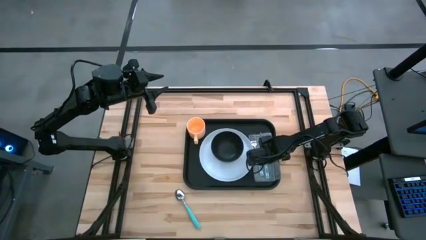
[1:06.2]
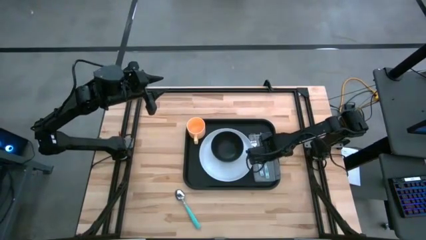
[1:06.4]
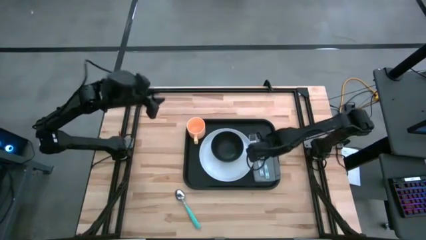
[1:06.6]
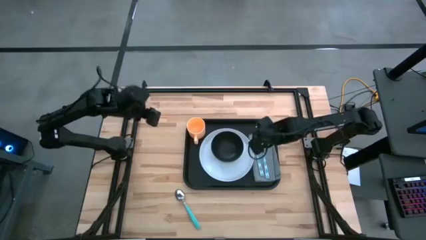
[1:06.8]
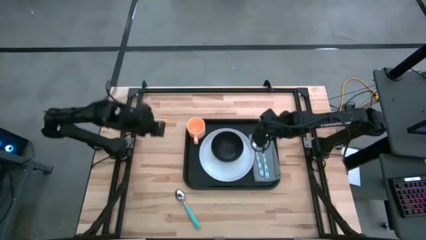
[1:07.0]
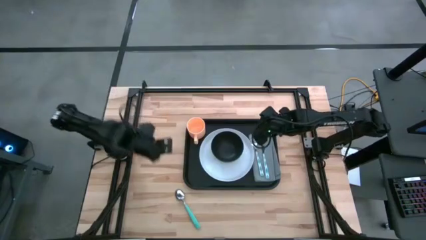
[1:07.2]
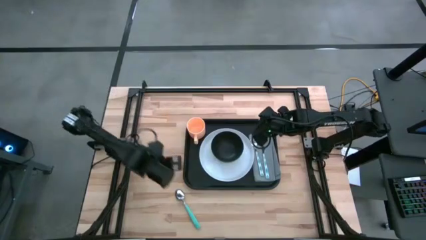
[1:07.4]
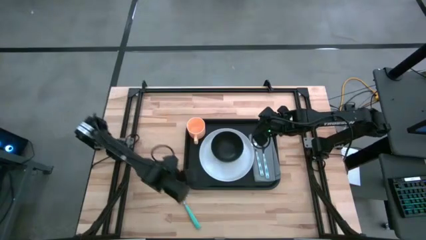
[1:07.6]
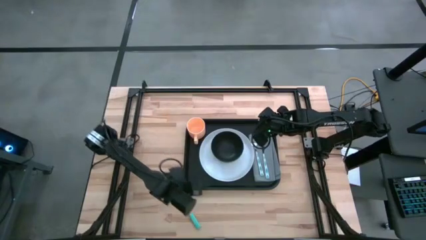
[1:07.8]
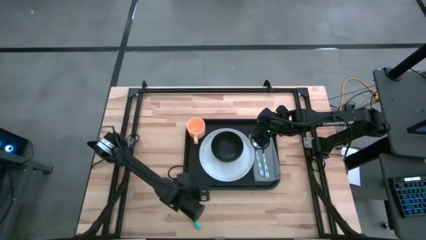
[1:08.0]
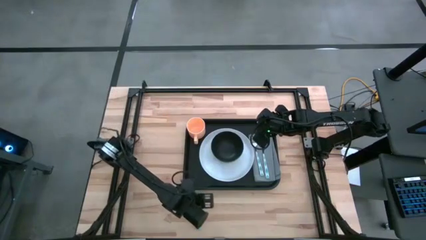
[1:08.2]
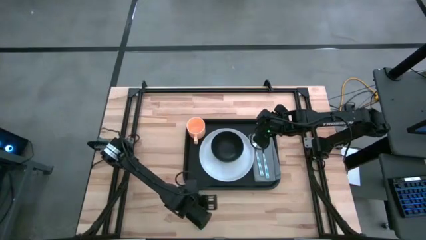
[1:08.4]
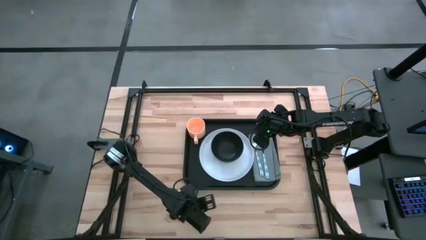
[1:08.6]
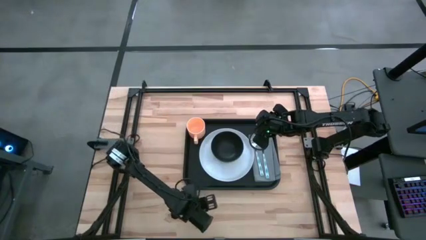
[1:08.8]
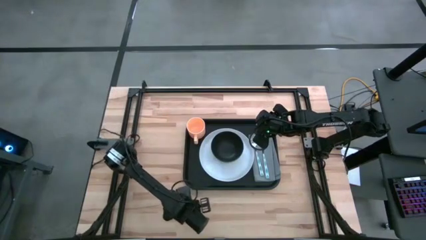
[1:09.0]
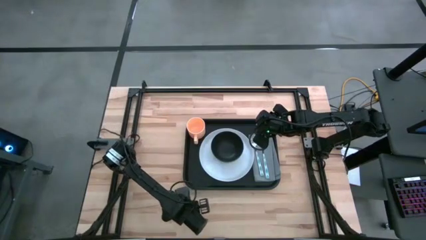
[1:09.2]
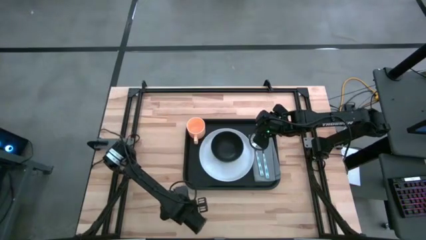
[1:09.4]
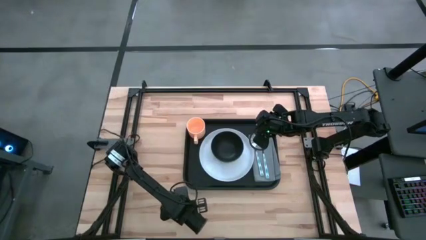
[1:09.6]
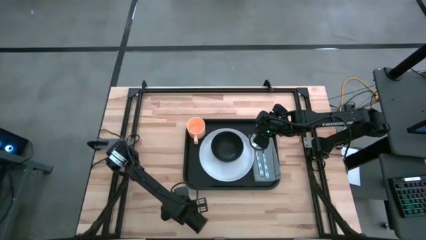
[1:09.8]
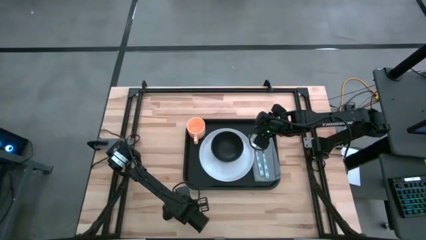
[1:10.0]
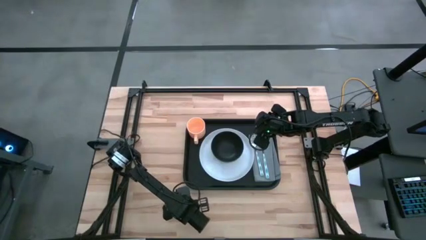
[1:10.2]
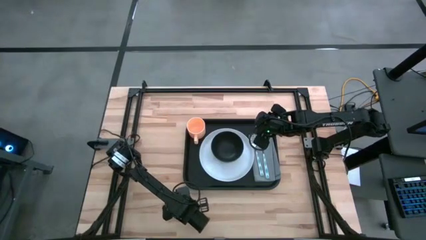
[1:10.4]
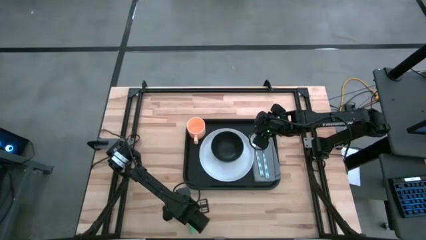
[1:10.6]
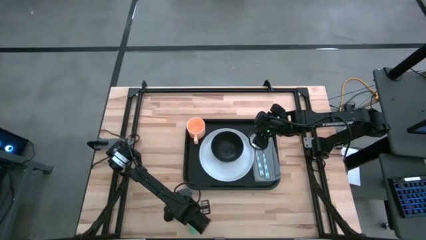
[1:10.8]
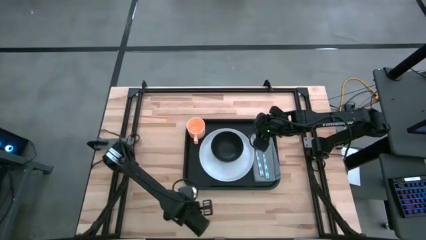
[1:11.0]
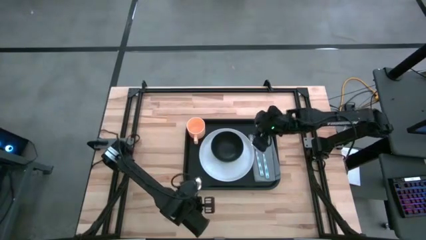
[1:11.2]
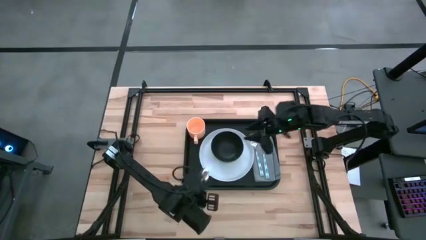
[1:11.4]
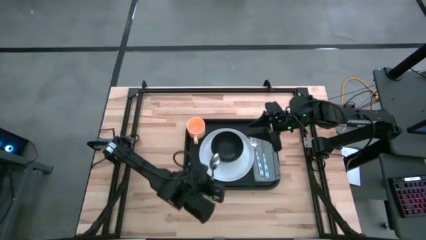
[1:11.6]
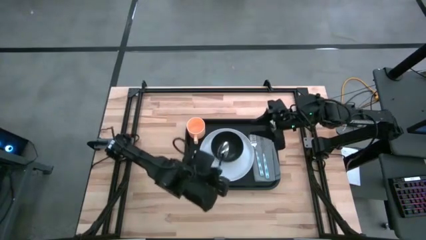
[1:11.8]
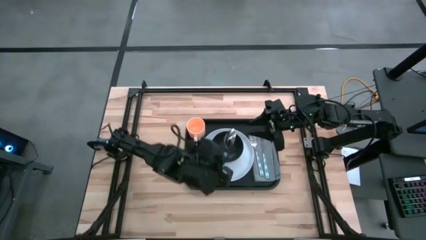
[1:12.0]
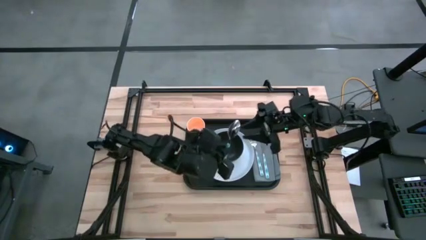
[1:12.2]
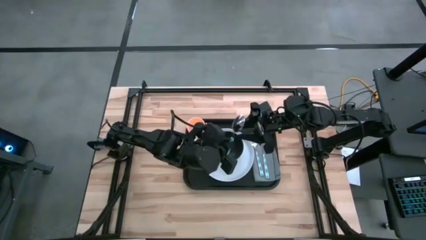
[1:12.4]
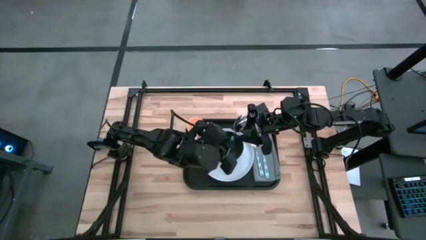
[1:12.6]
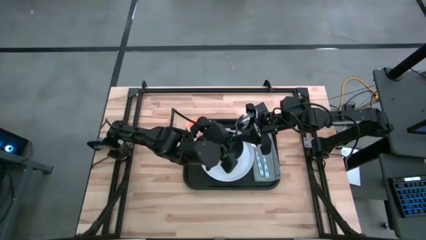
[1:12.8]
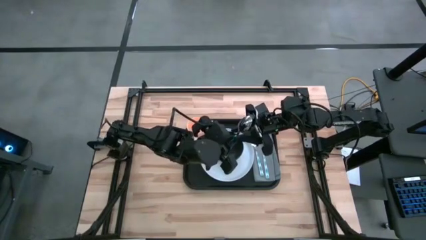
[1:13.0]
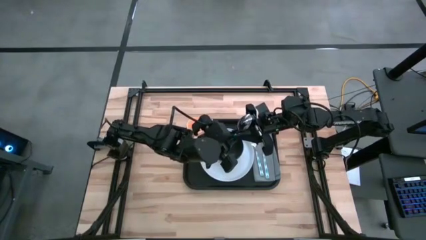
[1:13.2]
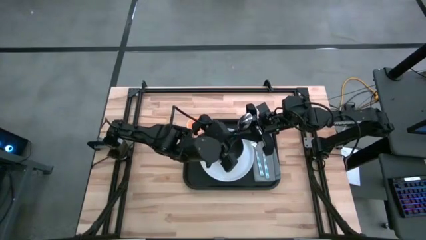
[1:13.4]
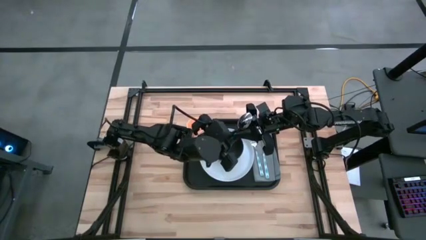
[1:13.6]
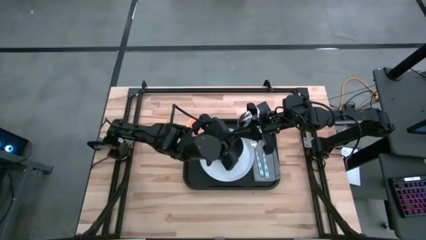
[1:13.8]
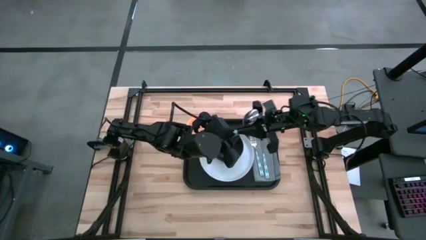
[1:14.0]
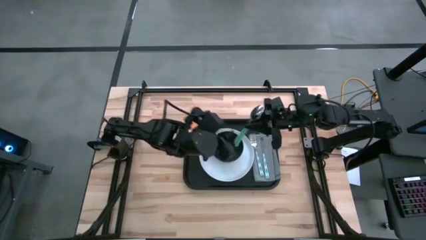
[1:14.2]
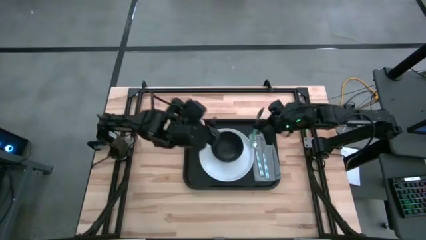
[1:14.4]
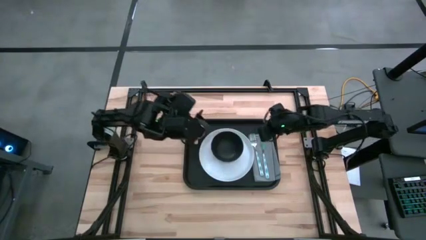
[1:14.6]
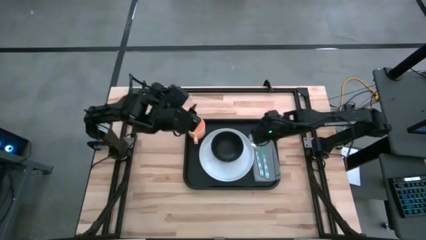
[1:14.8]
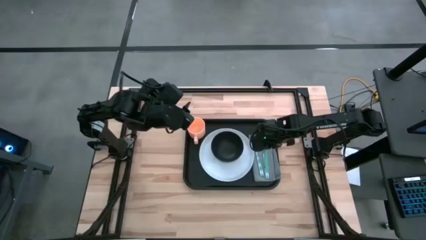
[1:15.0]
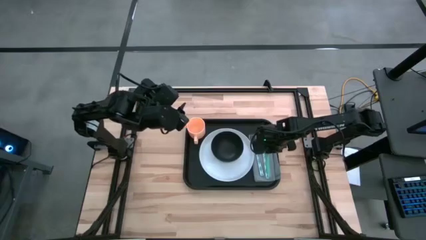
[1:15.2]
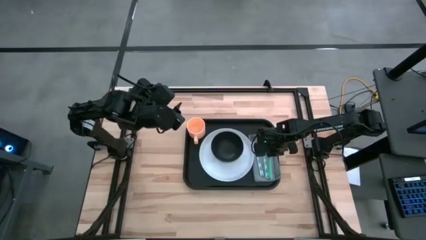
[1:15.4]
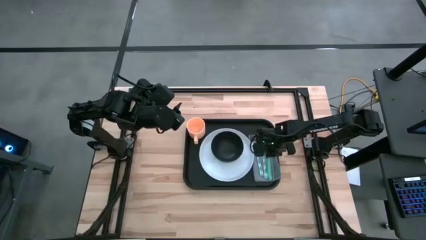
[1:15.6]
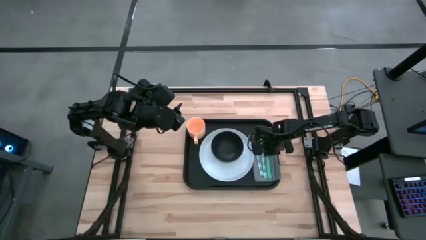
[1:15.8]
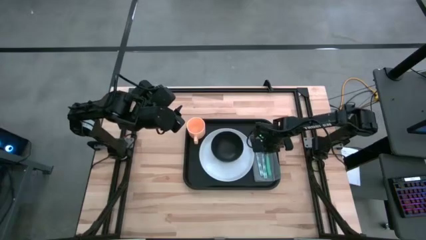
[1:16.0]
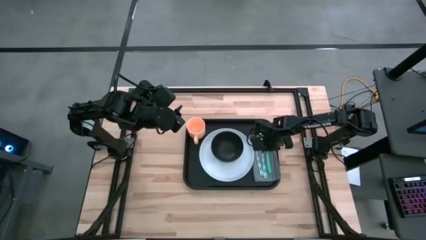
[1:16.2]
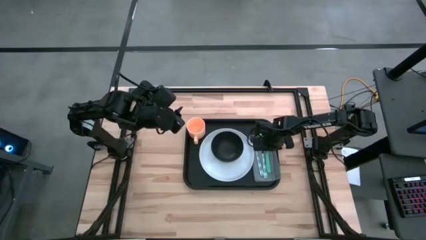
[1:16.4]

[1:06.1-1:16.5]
Task: Set up tray
Put the green spoon on the gray napkin to the right of the green knife

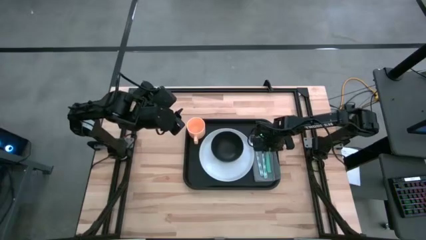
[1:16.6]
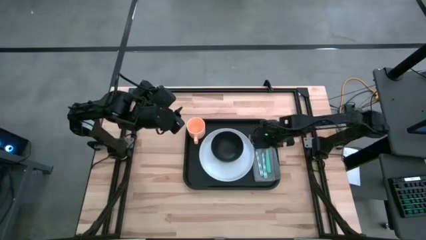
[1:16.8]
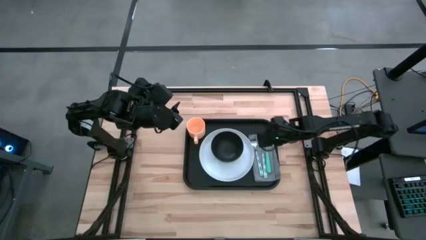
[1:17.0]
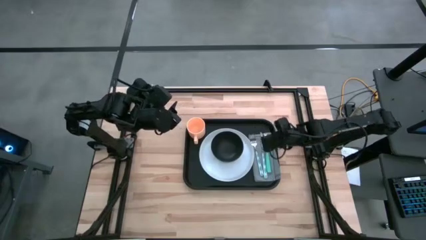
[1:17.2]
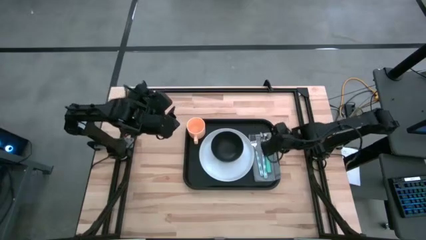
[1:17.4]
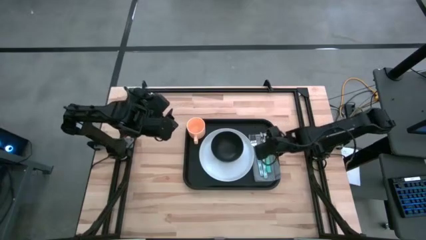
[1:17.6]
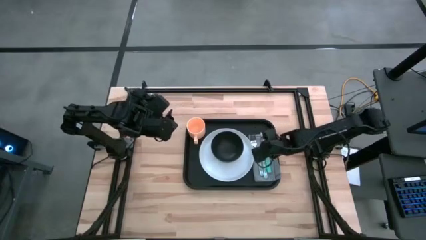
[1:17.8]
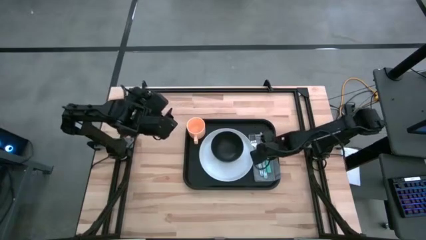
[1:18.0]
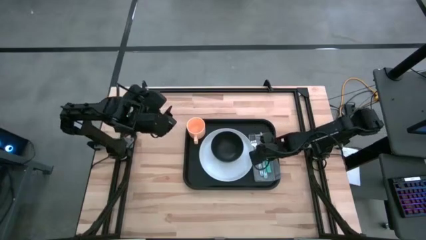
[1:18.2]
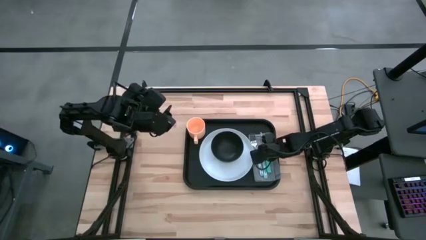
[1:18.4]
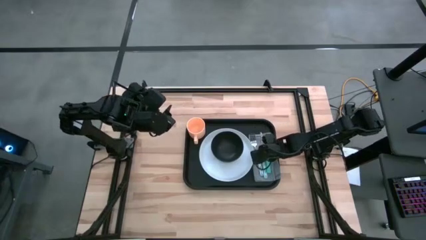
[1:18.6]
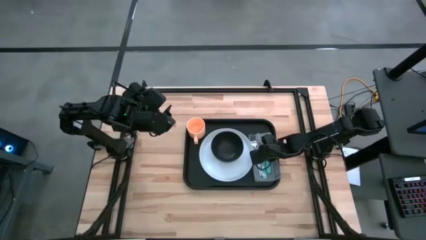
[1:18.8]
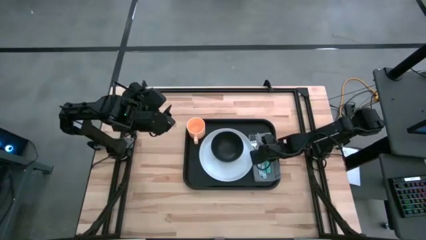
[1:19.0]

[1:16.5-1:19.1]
Adjust the green knife

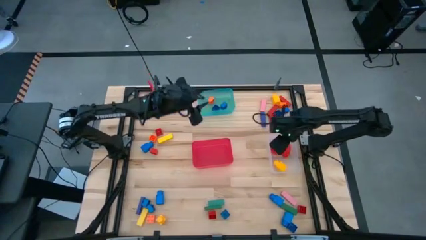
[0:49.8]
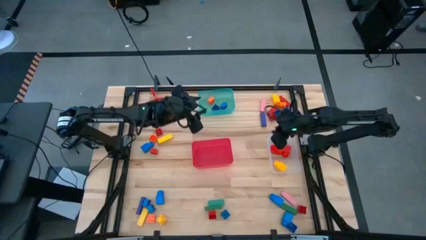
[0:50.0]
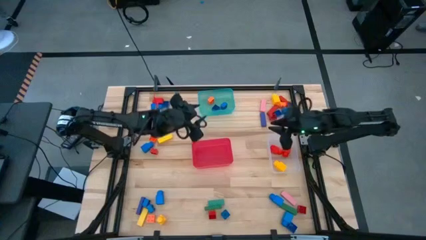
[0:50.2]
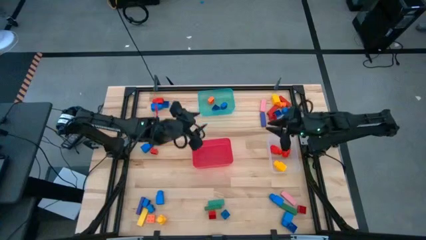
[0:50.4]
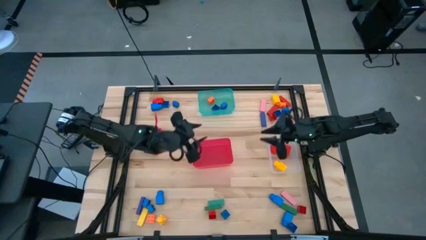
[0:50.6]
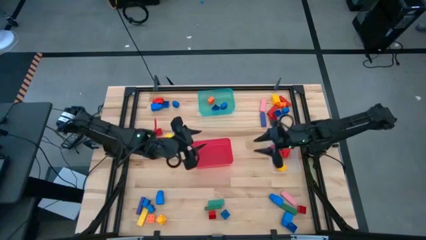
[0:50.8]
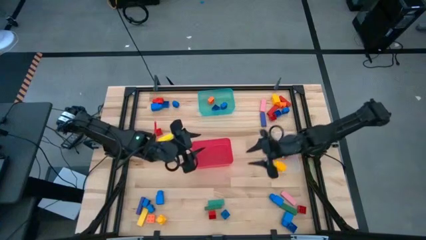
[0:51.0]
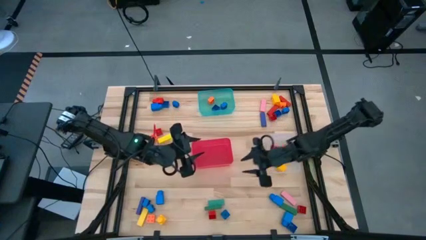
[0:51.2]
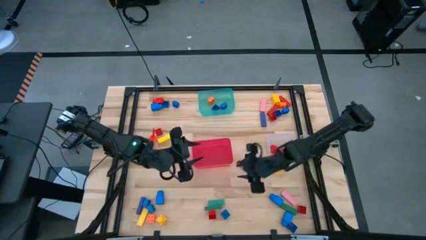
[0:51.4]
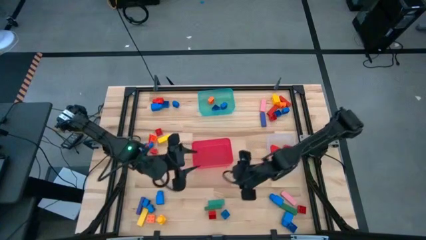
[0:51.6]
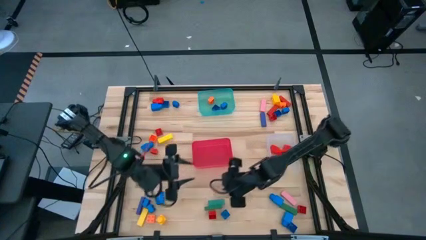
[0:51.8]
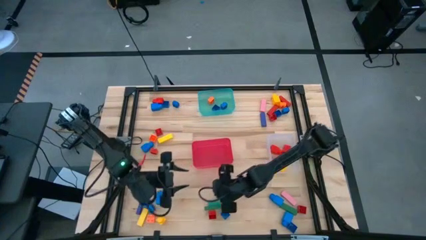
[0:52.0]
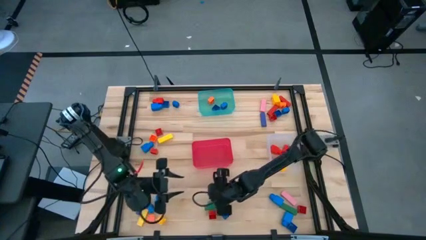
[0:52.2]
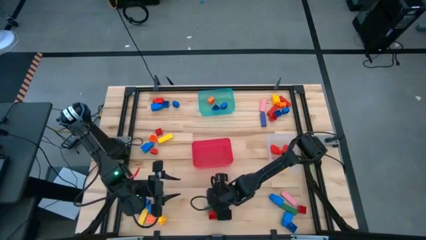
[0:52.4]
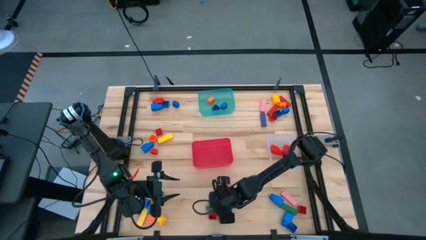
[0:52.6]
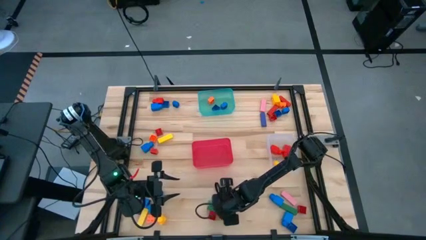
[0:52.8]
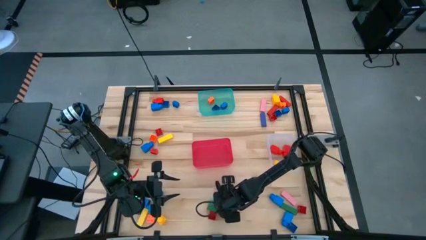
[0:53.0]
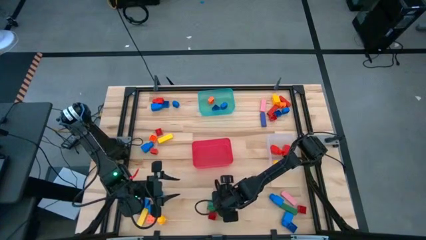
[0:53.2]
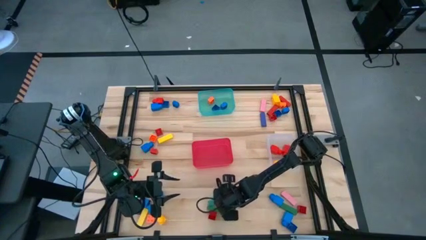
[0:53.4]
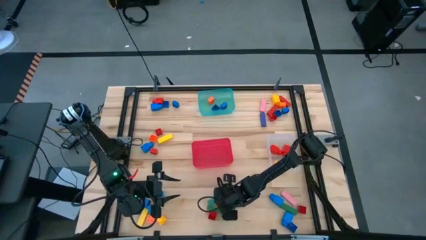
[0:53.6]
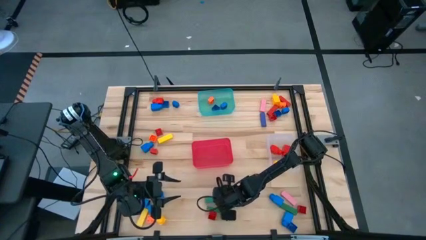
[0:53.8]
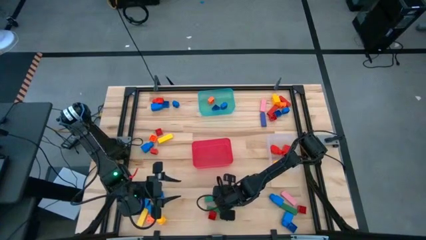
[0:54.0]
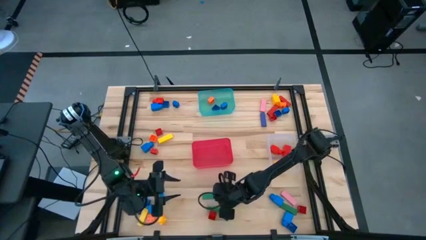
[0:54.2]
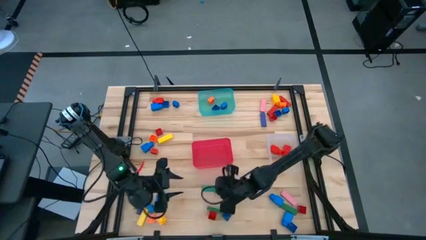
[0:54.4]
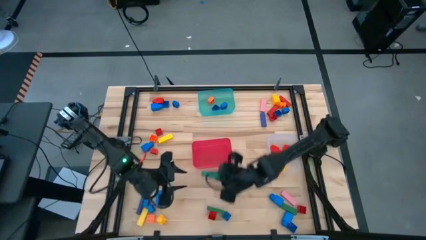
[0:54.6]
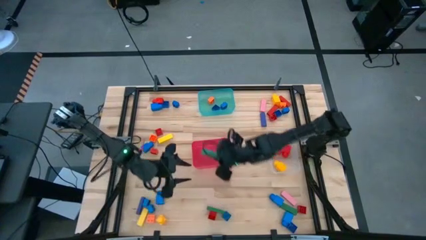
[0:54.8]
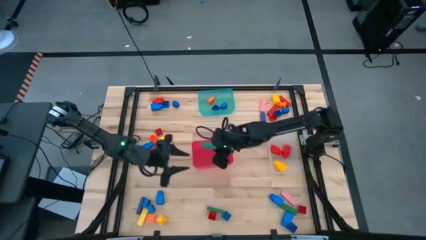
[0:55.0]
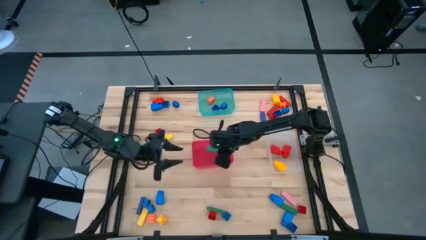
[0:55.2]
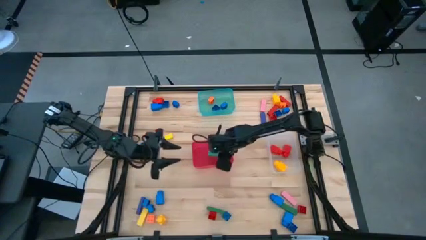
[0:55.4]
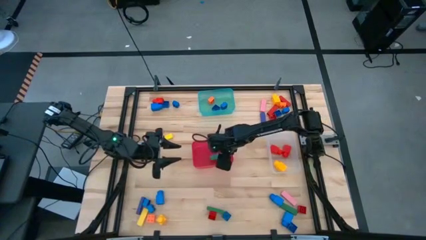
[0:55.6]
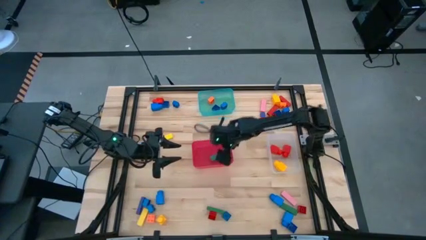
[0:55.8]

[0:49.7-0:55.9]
Task: Sort blocks by size
Put the blue block into the red bin
